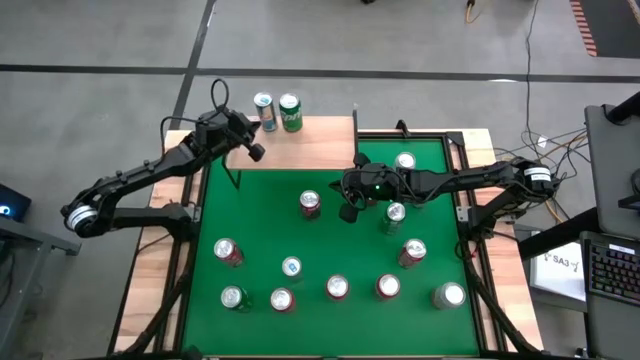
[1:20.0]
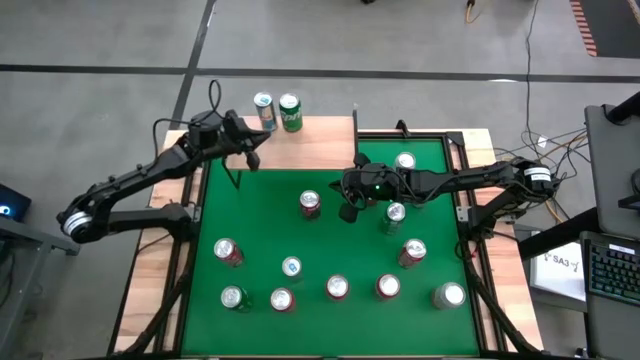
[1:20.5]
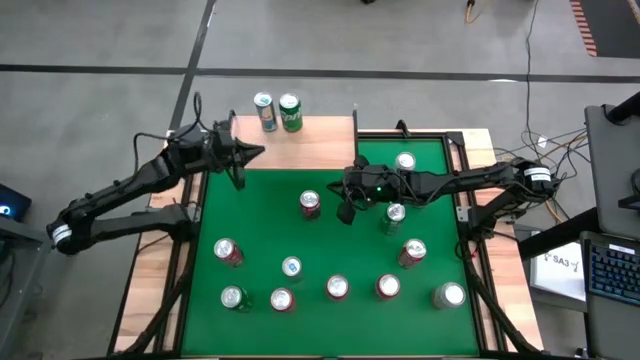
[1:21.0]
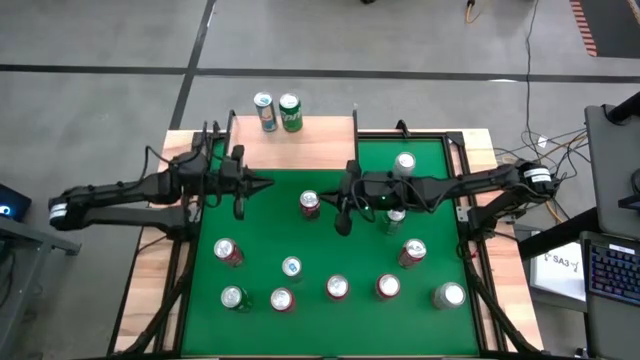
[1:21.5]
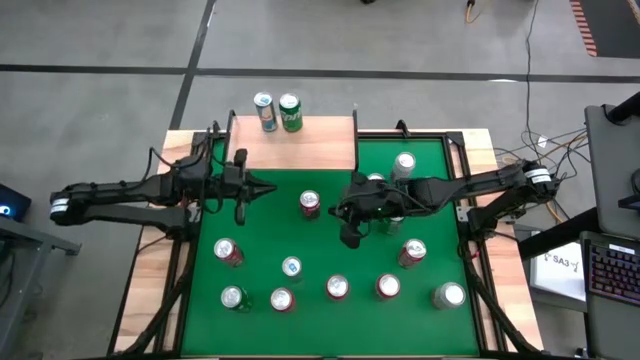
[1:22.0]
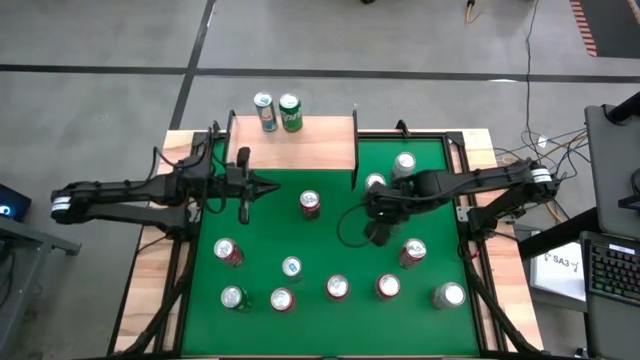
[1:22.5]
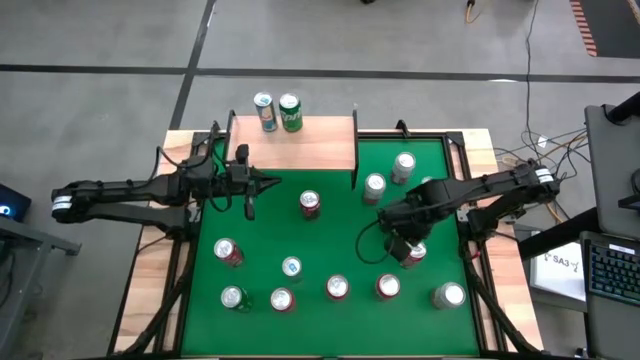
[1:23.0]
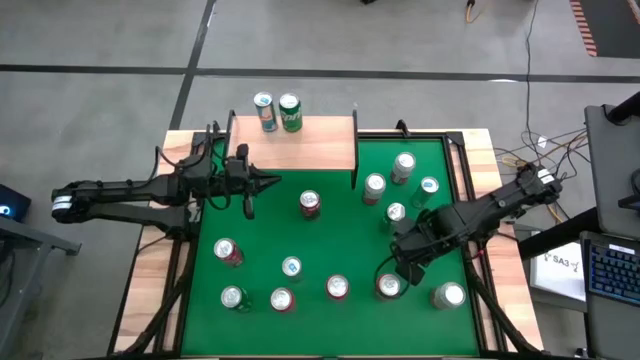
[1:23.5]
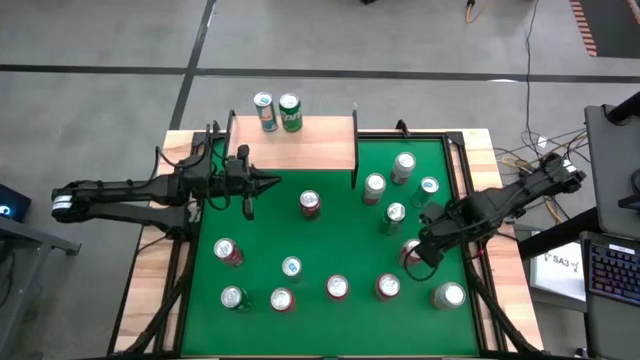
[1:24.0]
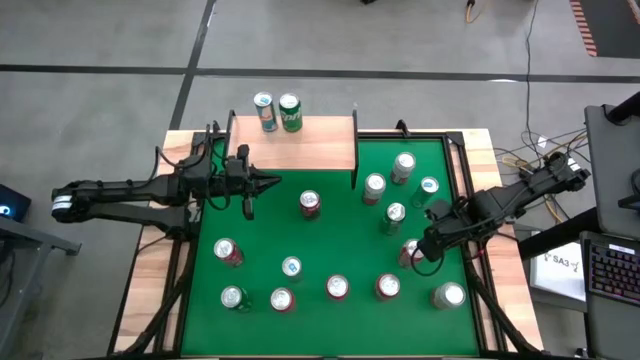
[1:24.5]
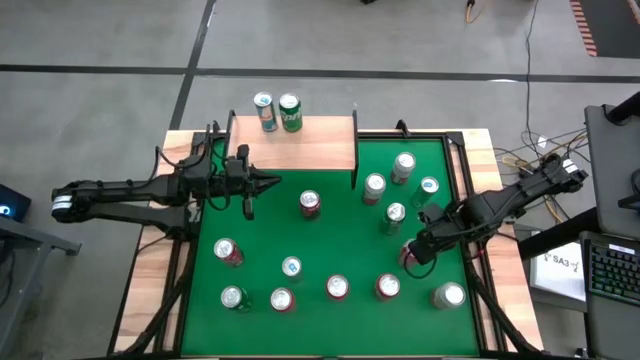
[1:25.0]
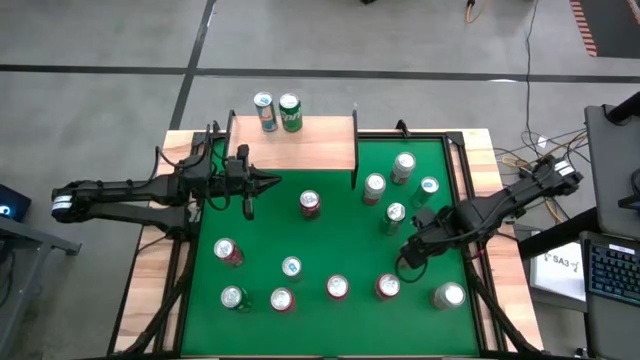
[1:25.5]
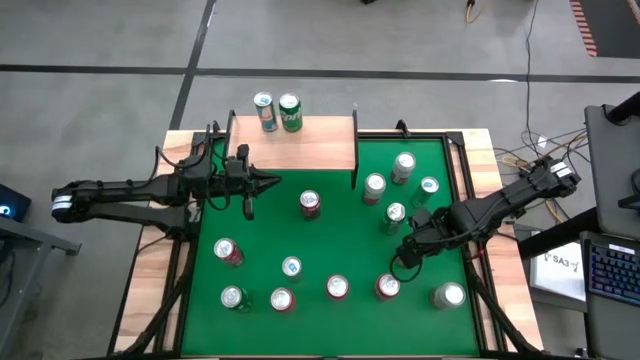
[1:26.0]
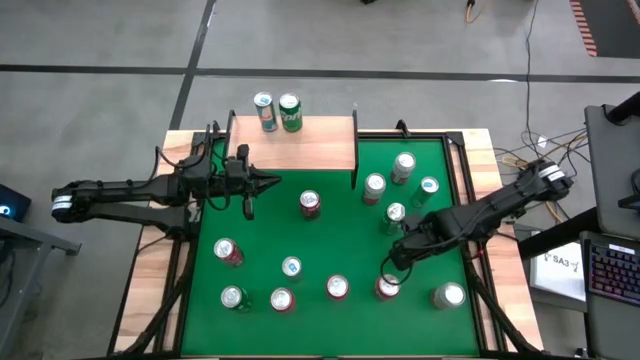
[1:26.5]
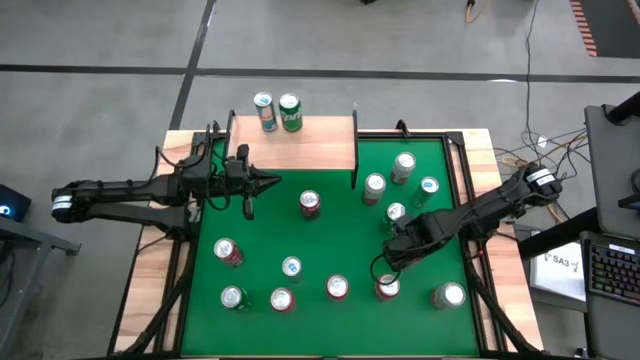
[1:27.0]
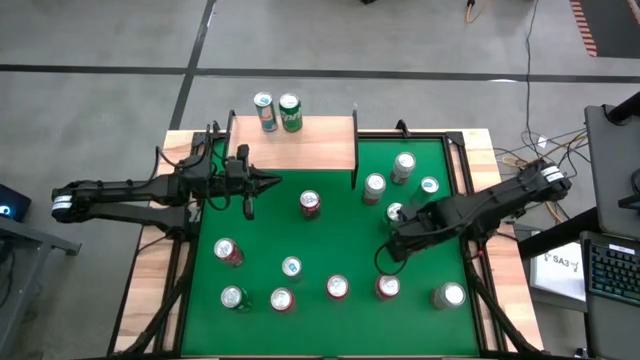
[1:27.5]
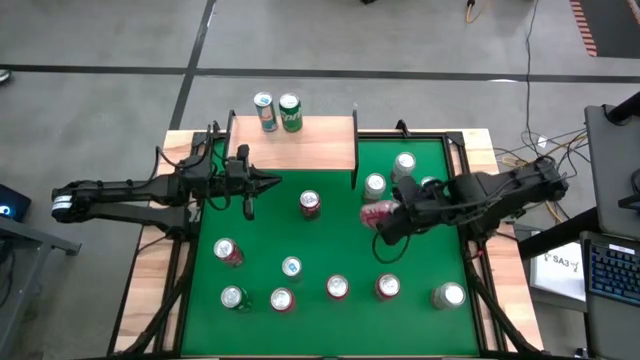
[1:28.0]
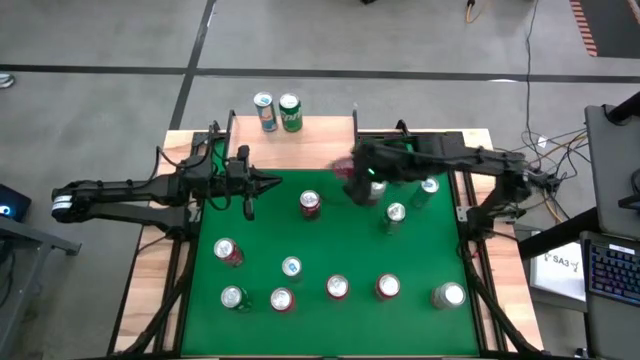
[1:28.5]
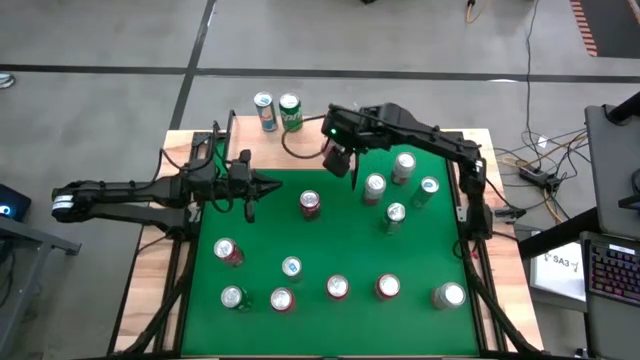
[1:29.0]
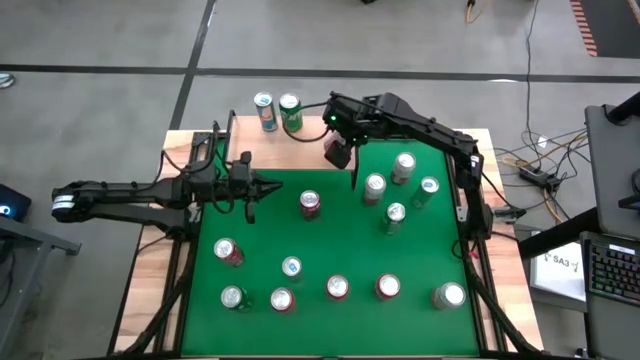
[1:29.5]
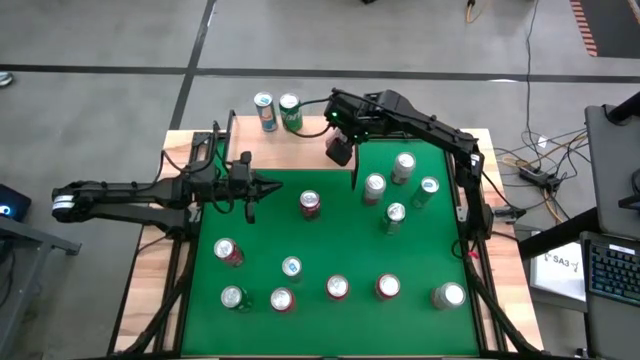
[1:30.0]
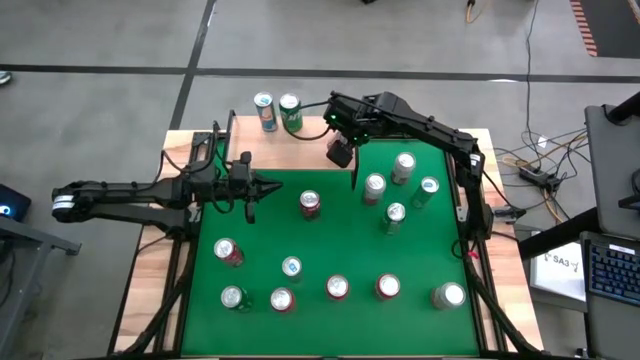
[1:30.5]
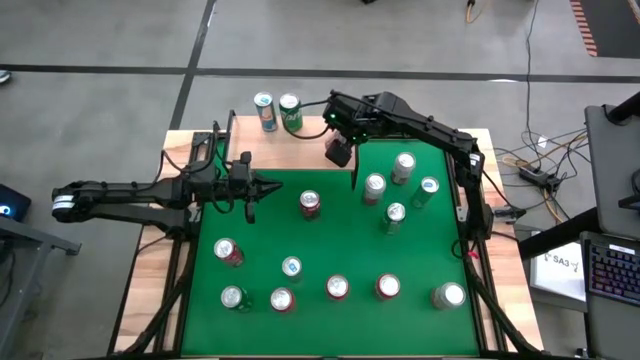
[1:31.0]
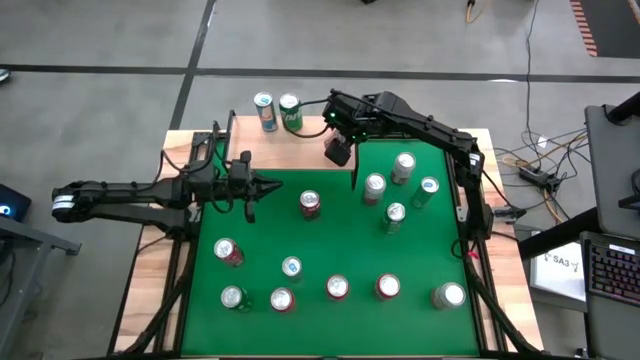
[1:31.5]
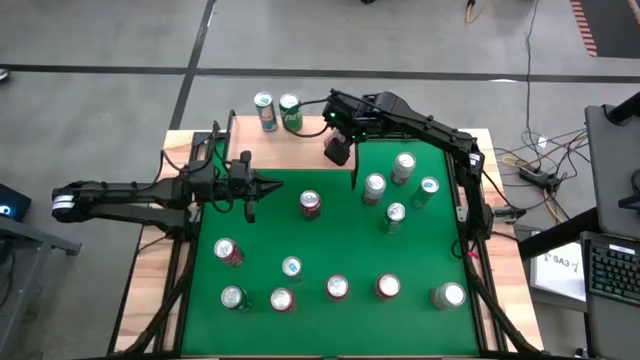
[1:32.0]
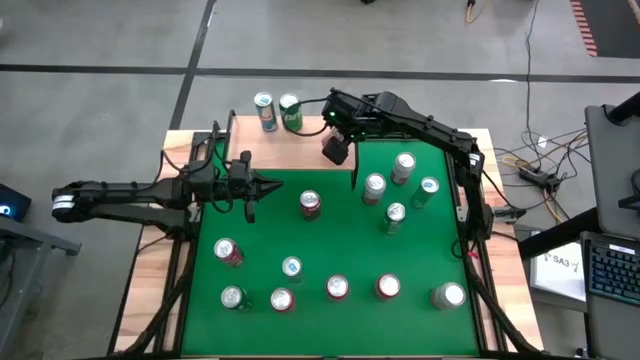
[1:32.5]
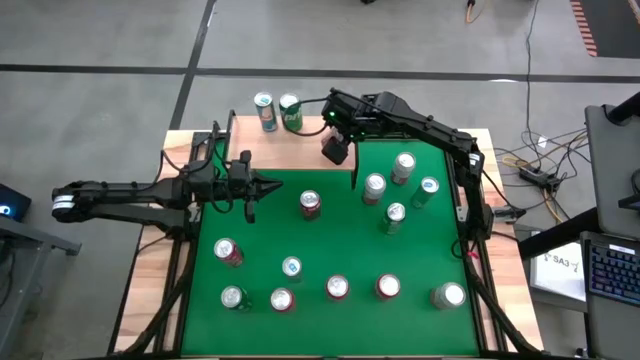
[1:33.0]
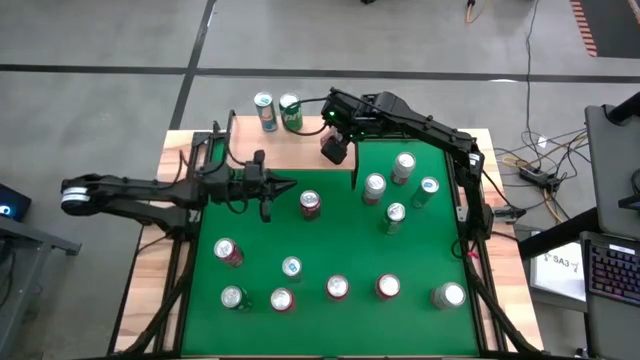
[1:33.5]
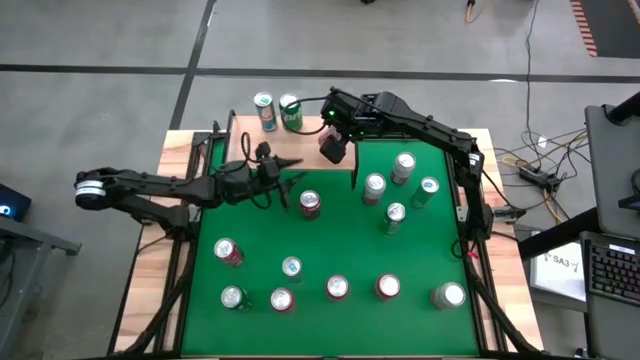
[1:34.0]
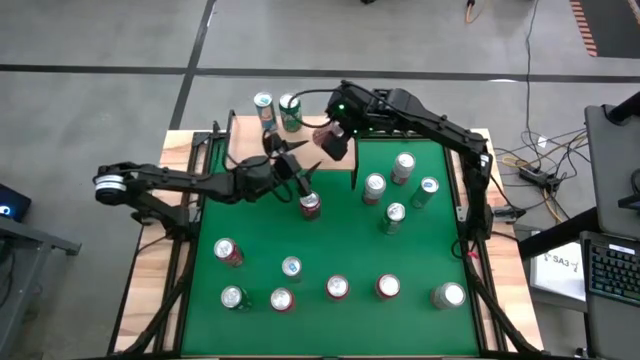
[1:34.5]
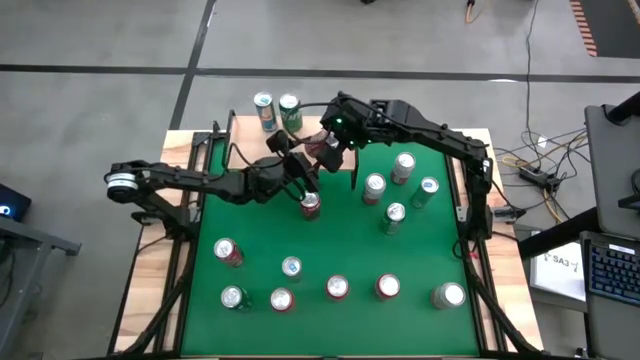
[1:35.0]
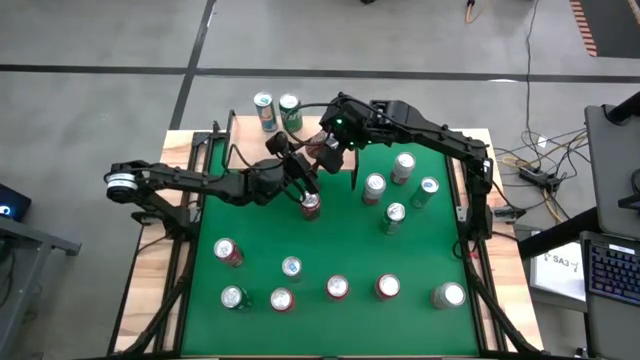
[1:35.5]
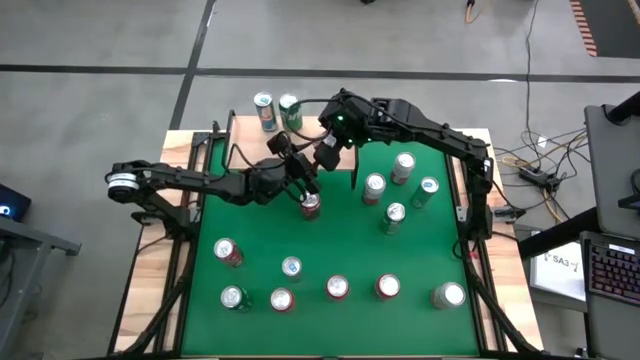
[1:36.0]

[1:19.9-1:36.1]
Task: Place canned beverage on shelf
Put the red can on the shelf

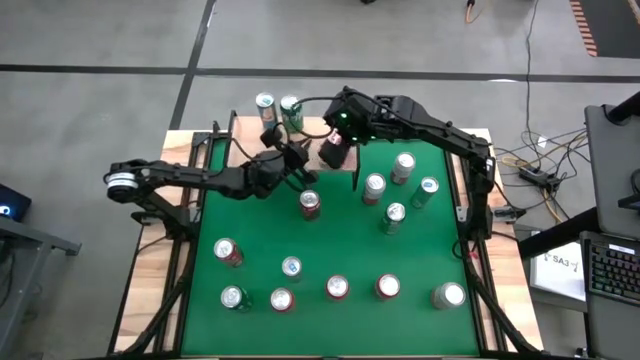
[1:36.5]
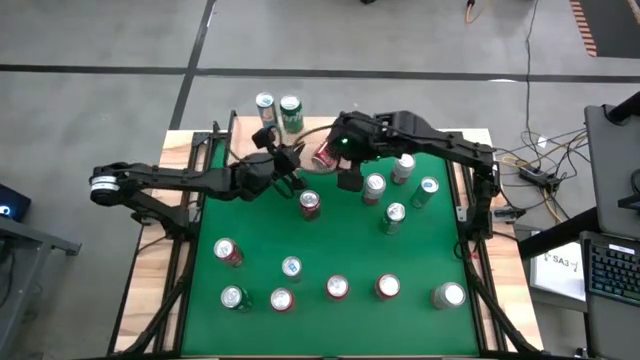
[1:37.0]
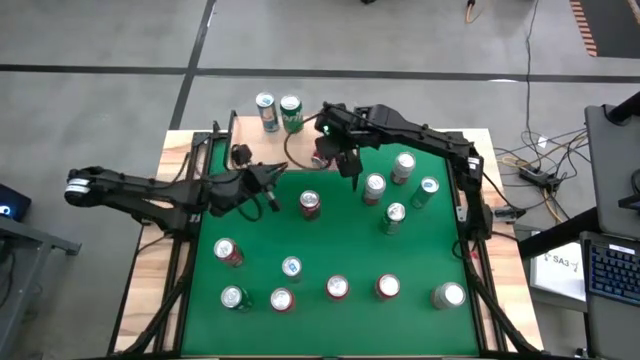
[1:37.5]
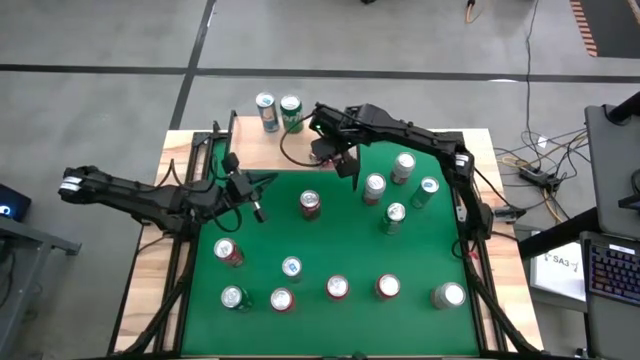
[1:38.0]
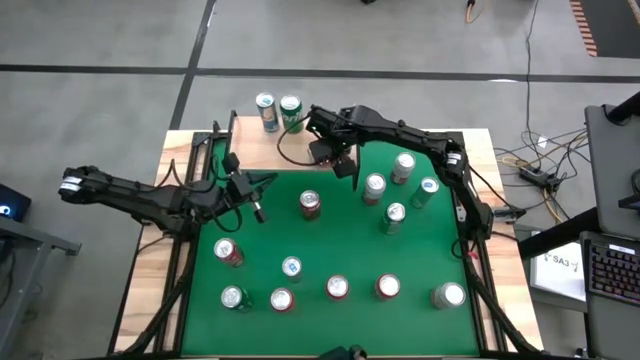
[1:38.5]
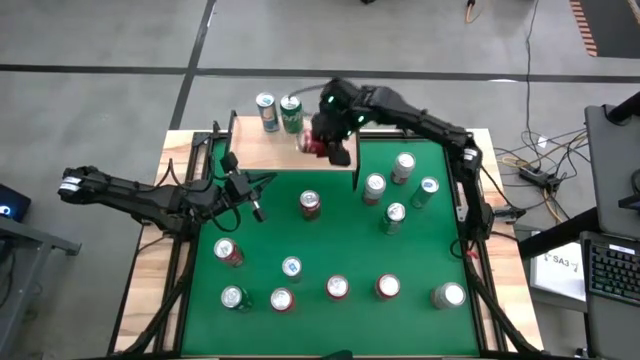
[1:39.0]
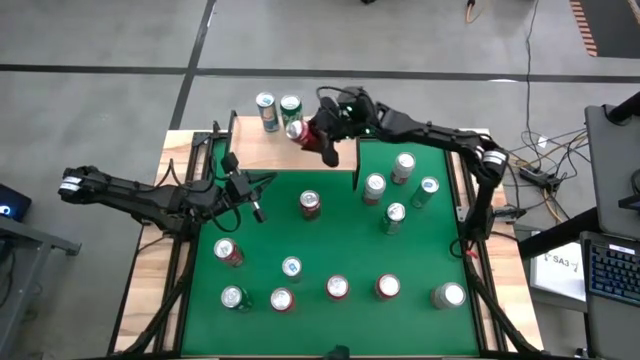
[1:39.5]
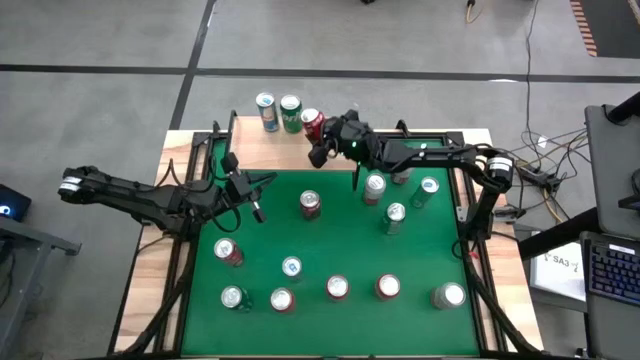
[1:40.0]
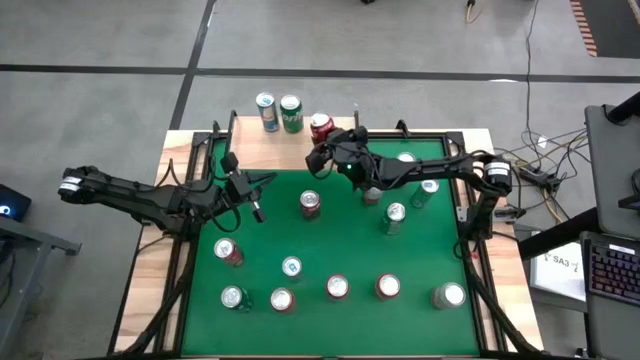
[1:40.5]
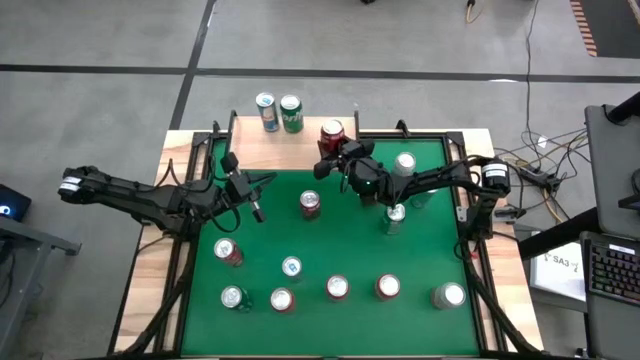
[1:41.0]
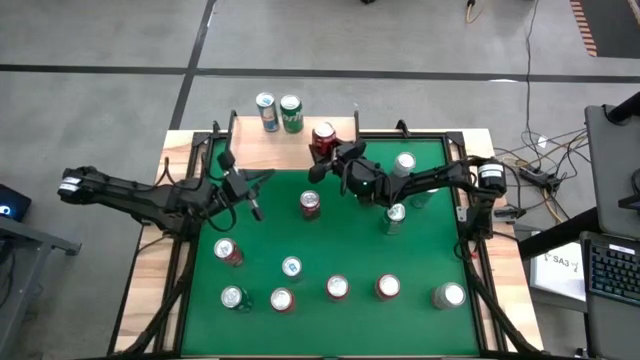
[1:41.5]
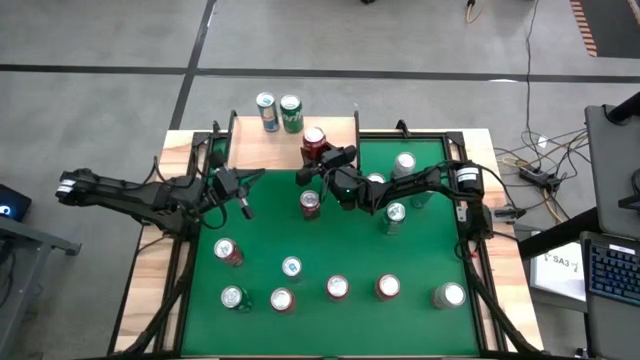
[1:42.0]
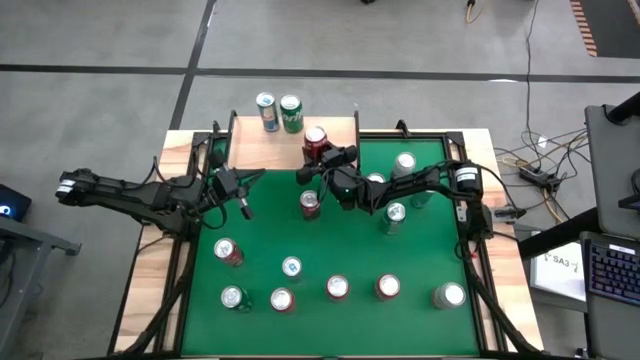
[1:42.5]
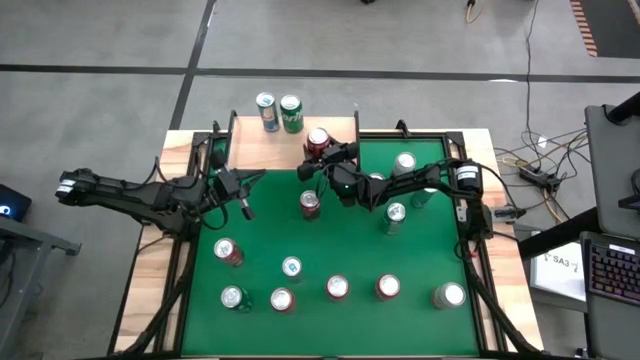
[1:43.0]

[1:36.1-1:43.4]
Put the red can on the shelf
